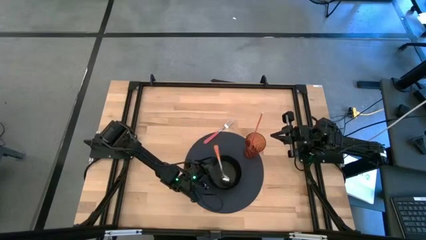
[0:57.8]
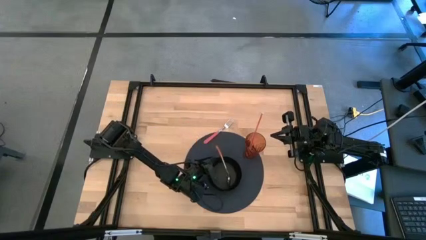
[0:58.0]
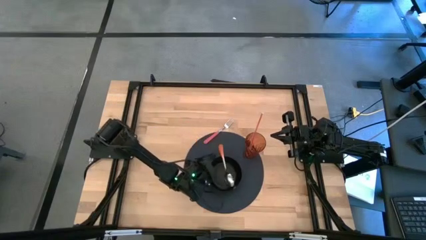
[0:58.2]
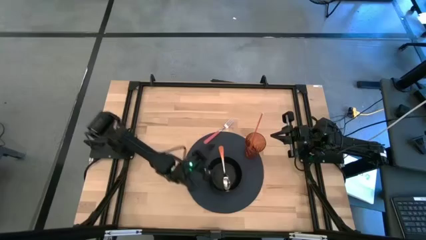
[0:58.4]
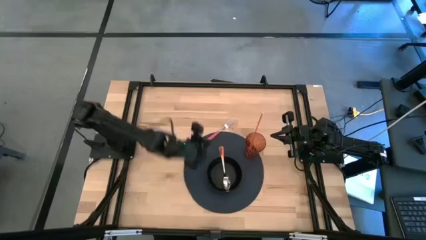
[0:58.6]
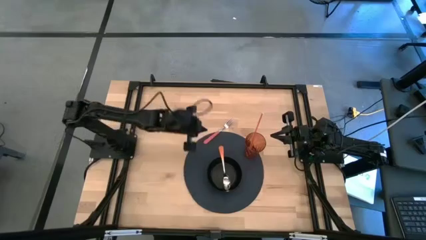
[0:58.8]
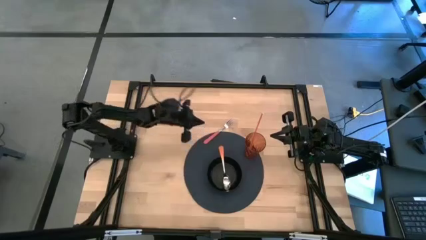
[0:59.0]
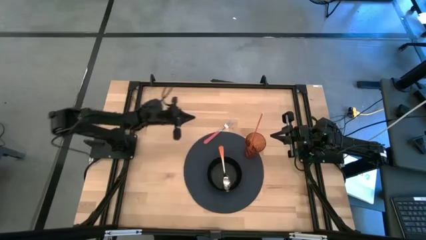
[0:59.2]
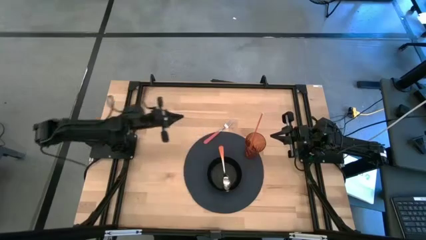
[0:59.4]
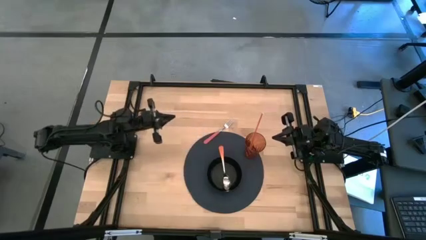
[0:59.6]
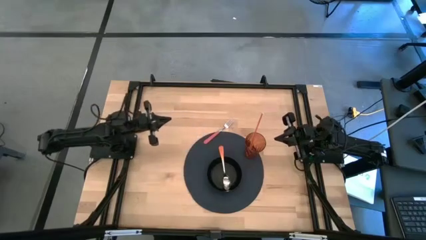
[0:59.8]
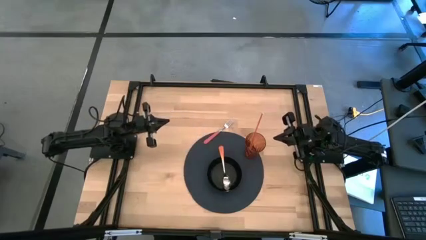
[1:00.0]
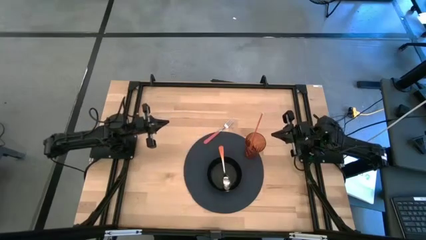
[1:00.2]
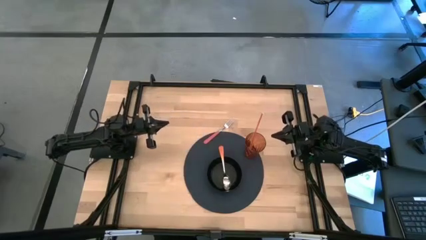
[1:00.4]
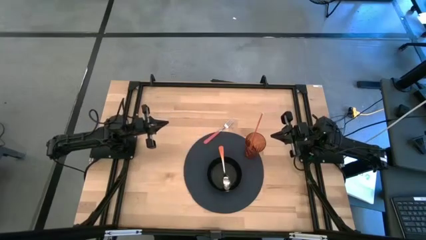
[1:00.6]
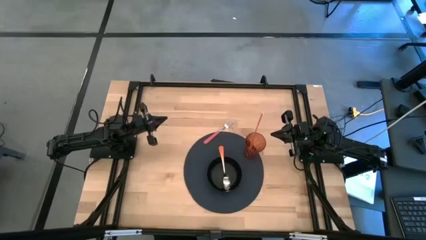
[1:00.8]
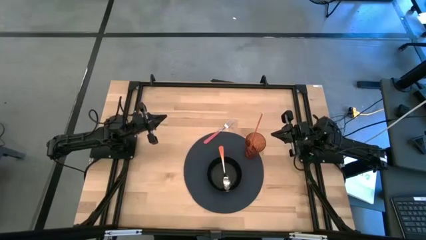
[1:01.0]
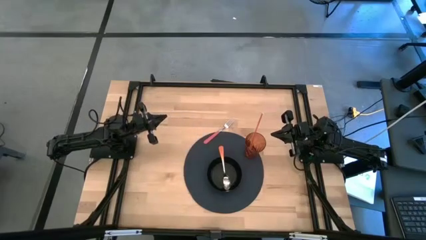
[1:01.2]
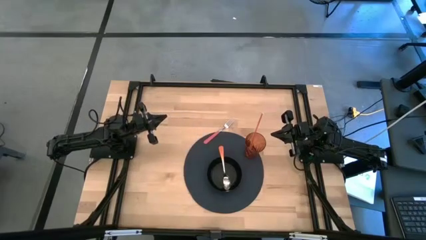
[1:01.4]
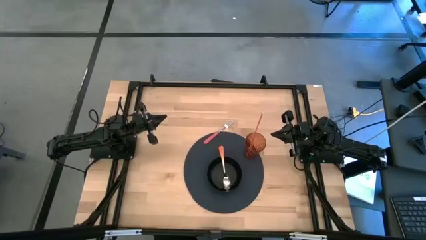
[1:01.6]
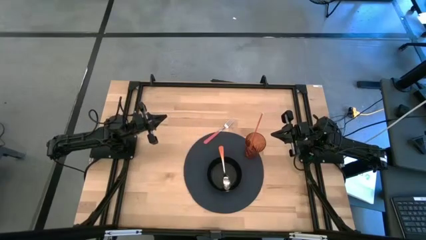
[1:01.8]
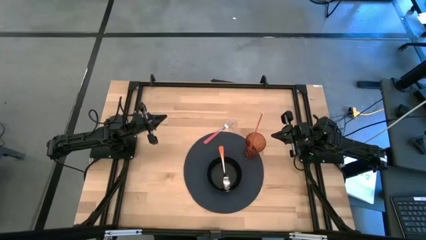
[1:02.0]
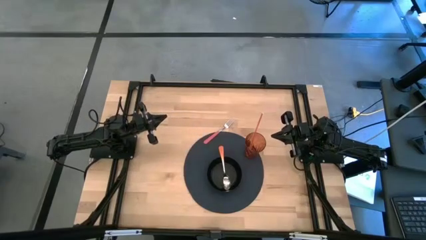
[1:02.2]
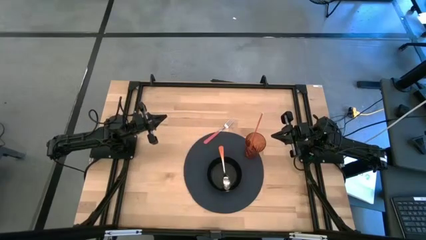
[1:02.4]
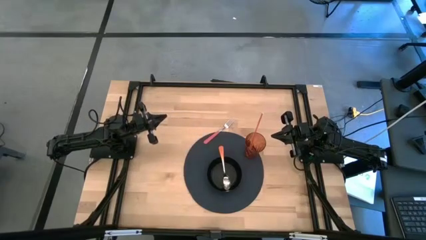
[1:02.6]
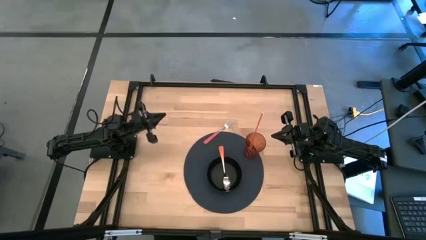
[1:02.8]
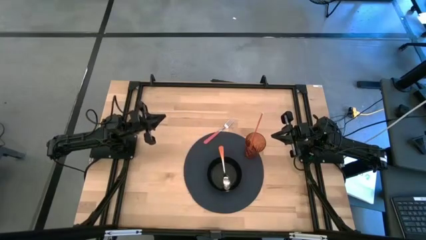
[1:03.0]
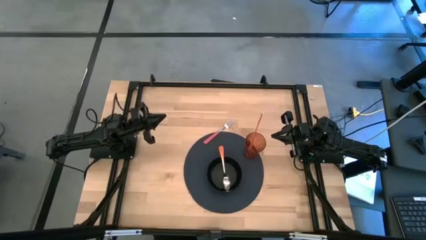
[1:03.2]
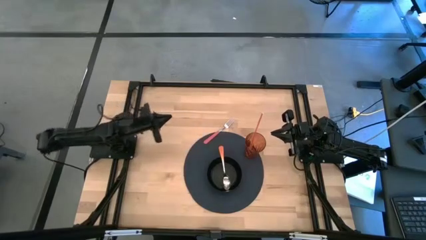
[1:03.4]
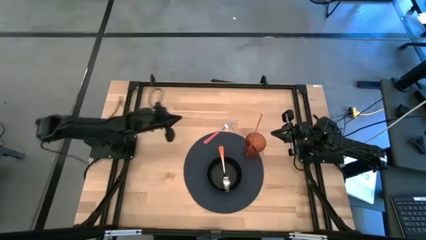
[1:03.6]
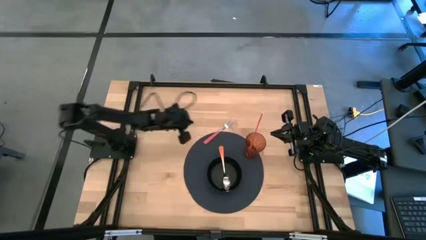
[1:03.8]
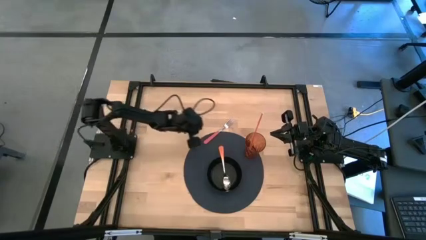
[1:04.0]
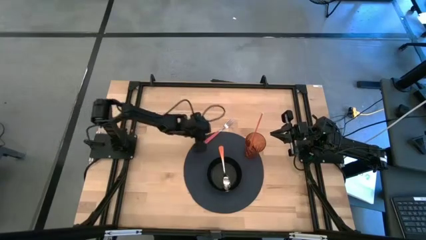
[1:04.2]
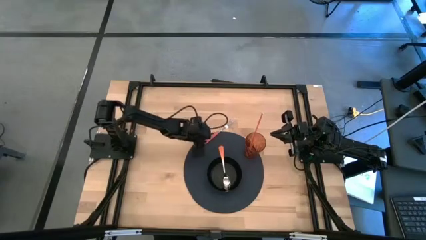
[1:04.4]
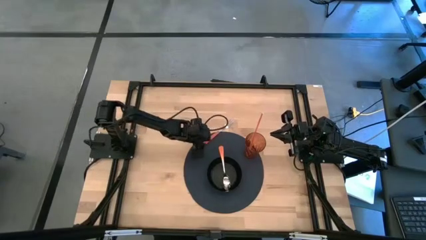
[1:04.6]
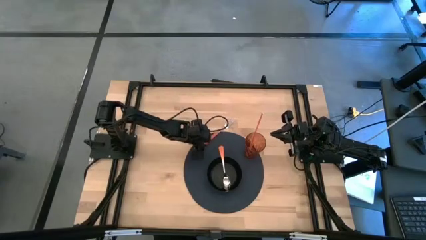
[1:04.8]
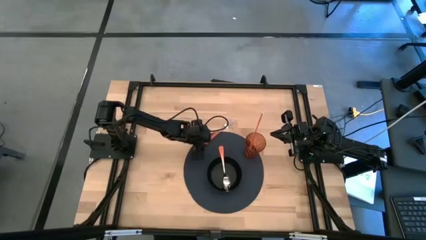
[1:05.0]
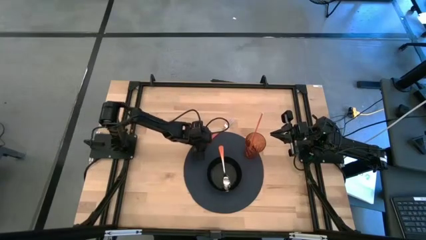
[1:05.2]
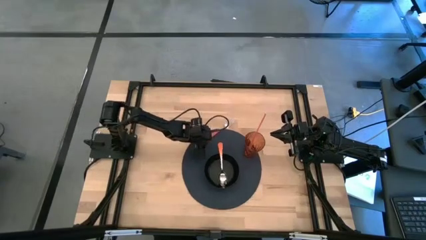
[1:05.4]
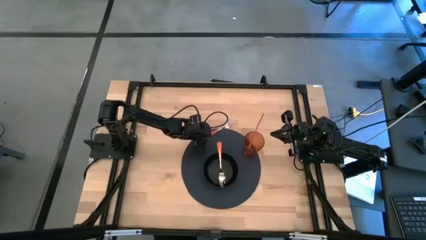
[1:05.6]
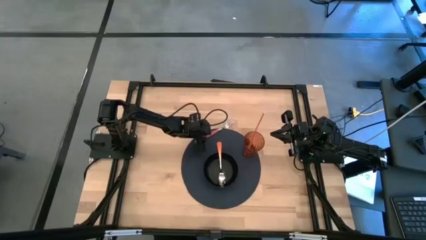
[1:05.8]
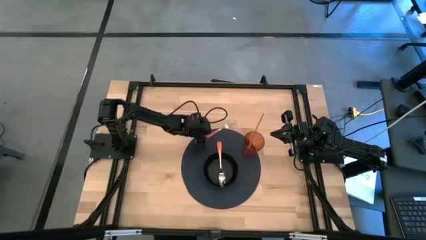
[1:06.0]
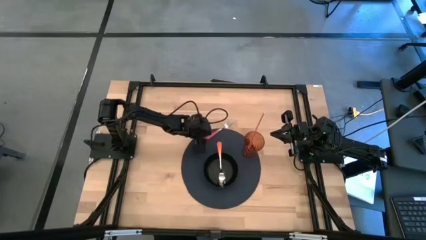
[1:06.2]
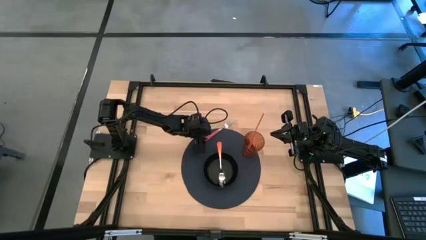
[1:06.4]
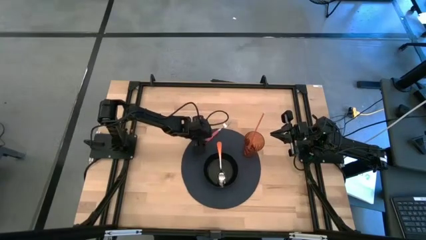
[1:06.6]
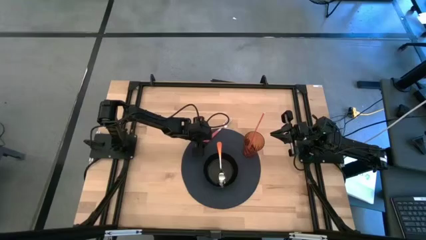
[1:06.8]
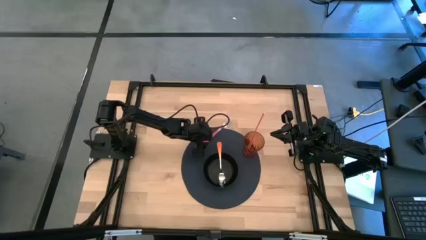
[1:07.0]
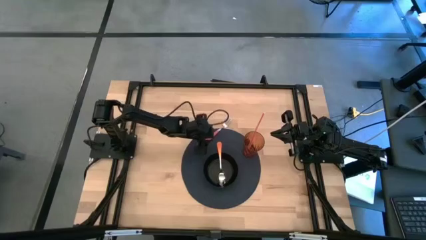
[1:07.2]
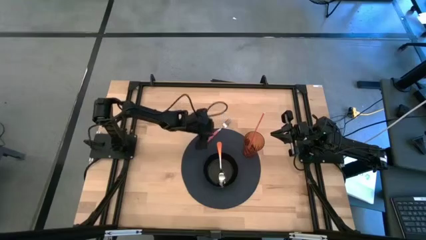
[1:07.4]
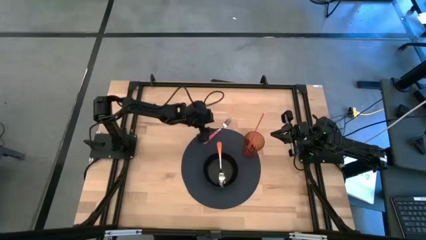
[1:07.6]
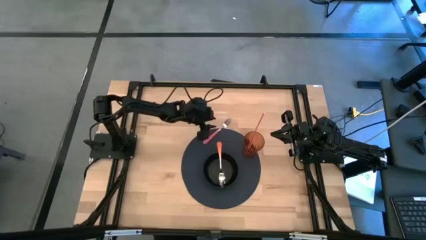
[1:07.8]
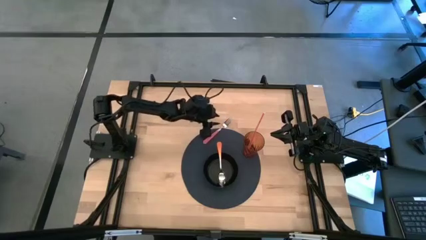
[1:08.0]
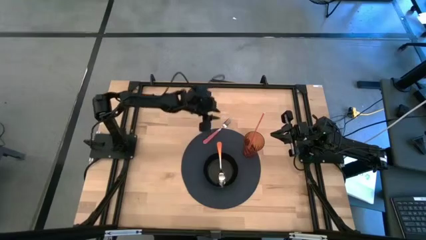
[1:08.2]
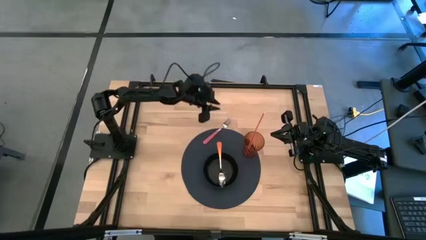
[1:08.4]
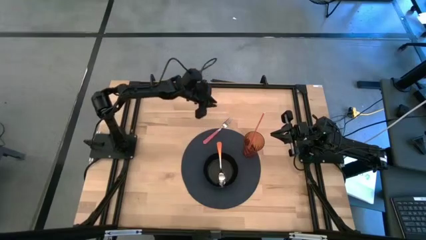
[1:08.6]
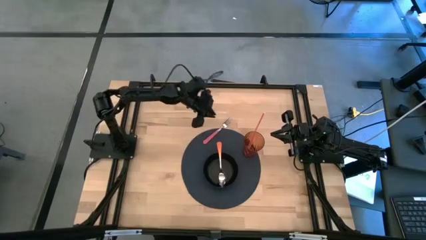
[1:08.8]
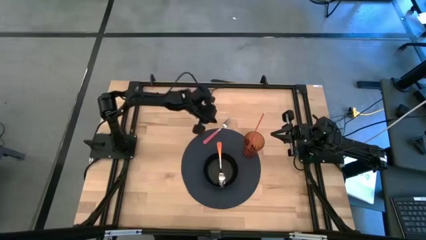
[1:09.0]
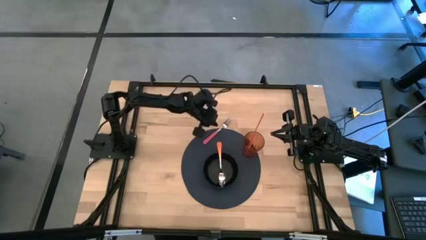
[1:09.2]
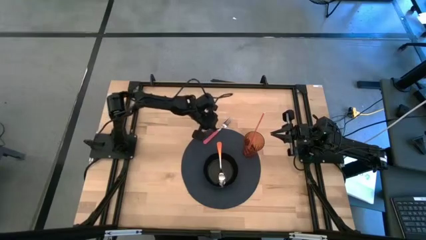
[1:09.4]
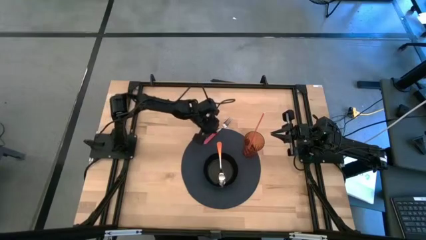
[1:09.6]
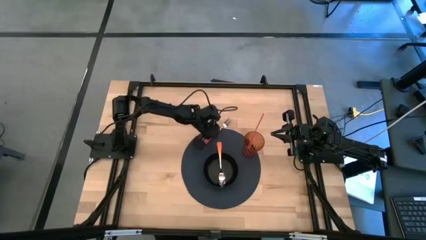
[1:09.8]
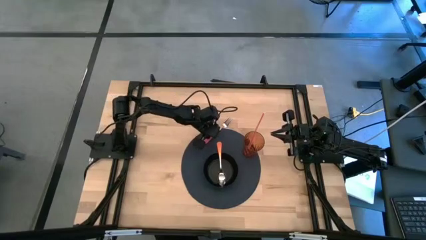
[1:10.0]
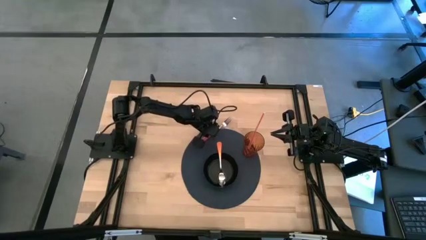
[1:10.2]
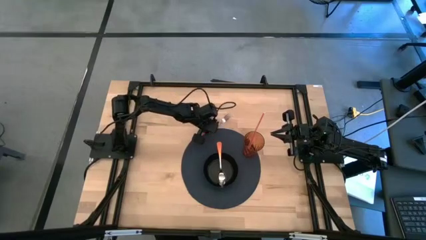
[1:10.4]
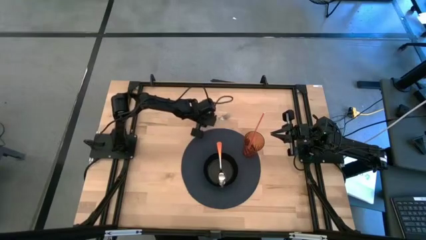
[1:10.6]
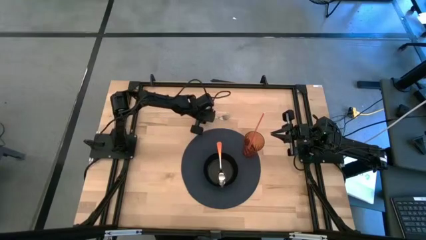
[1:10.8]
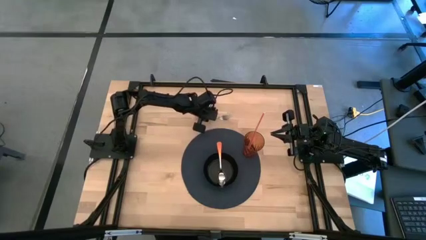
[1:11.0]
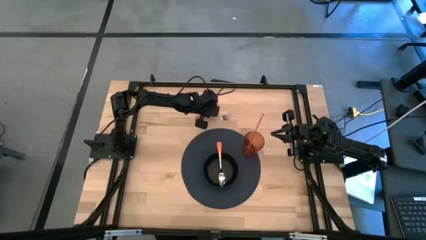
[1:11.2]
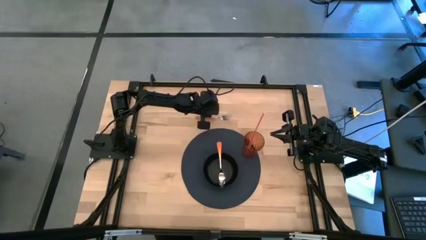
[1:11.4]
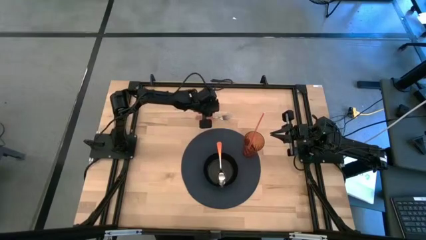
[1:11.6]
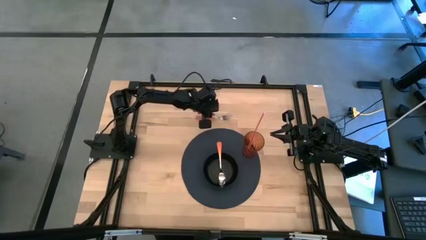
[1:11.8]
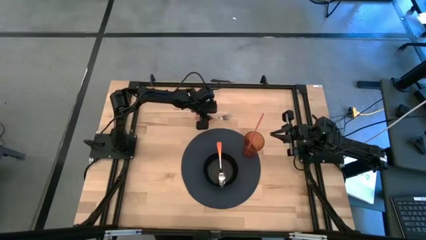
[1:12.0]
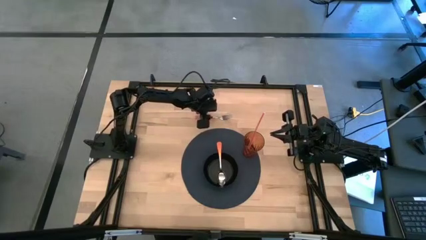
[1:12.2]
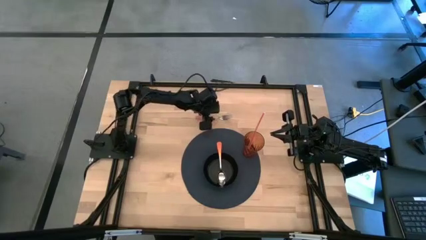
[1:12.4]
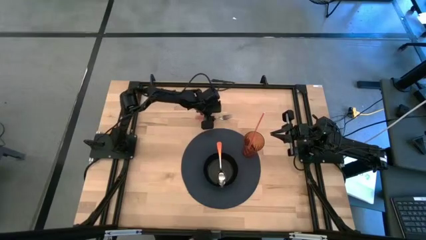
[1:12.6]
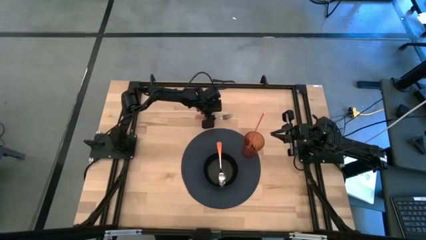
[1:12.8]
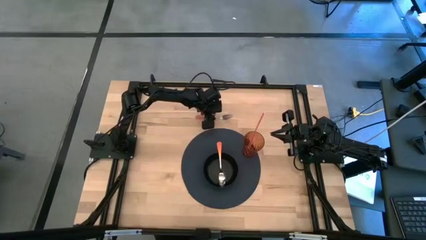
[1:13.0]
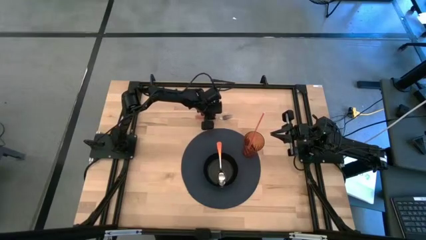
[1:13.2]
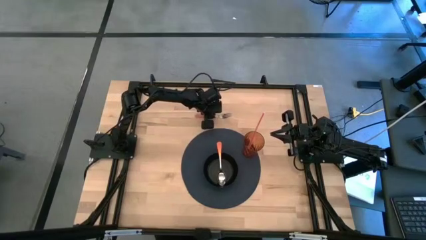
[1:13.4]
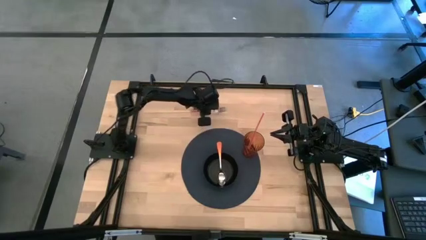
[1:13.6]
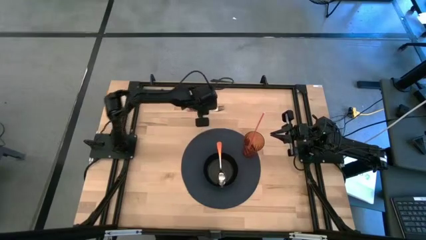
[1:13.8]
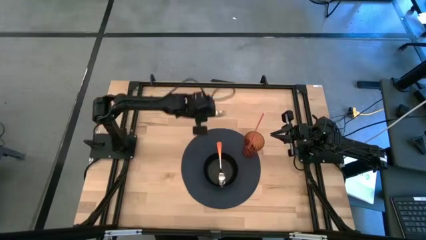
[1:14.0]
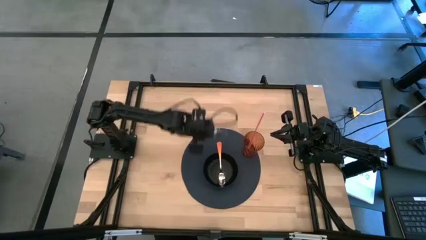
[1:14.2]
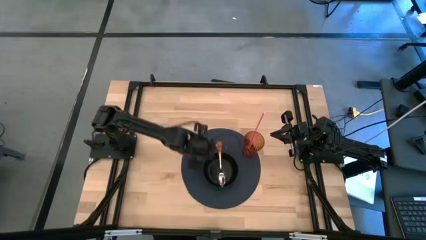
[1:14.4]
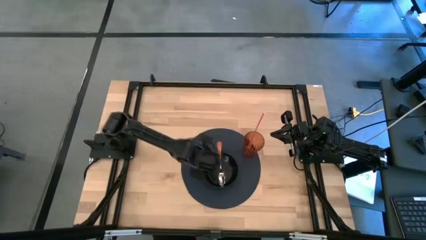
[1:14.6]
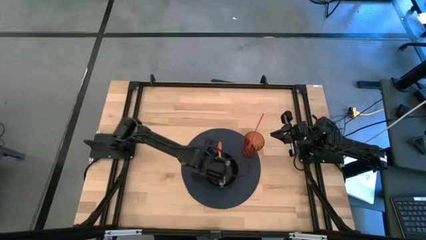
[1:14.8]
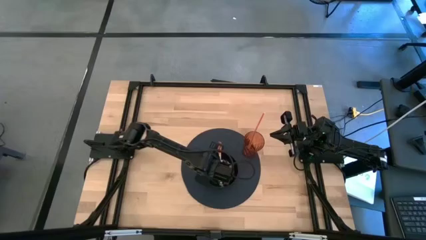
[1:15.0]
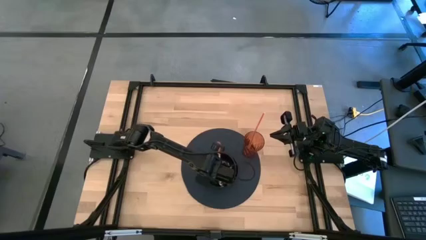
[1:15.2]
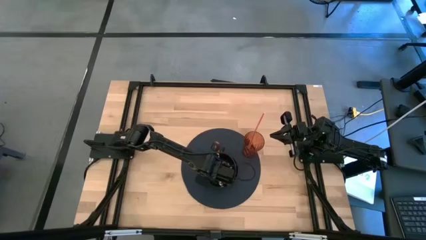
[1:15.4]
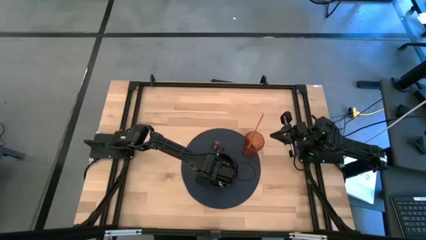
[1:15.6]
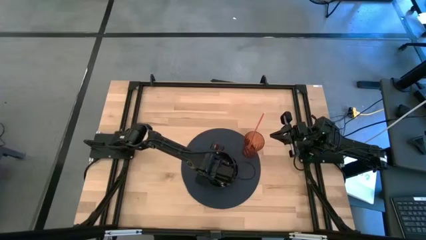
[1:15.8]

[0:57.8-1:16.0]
Task: Pick & Place Utensil
Put the red fork into the black bowl on the blue mat
